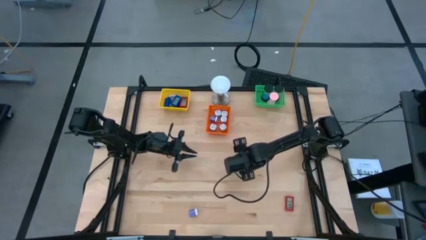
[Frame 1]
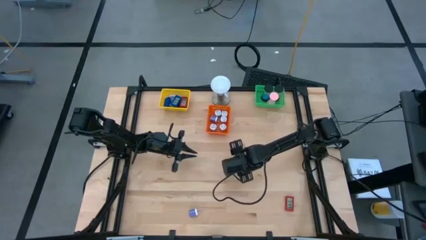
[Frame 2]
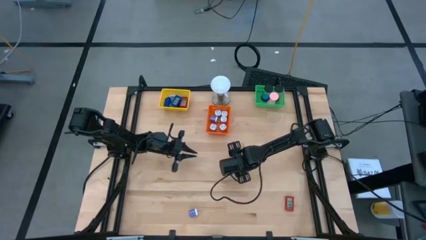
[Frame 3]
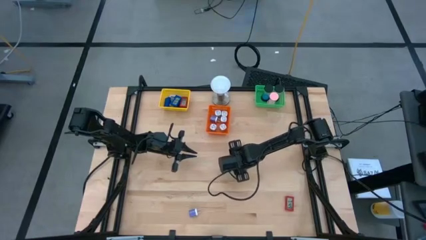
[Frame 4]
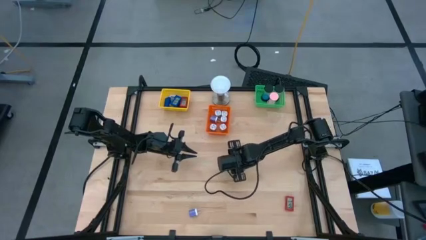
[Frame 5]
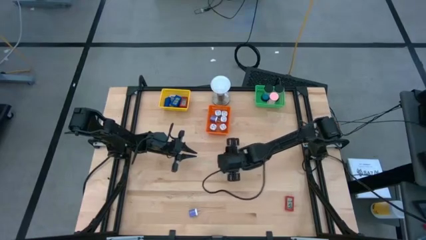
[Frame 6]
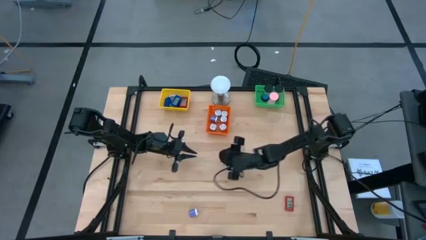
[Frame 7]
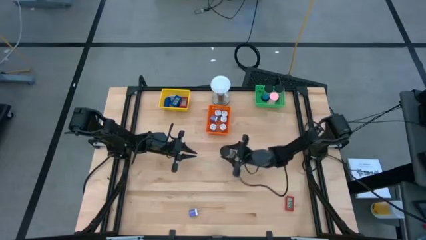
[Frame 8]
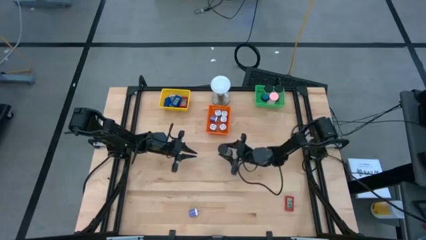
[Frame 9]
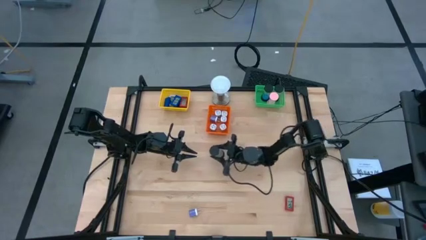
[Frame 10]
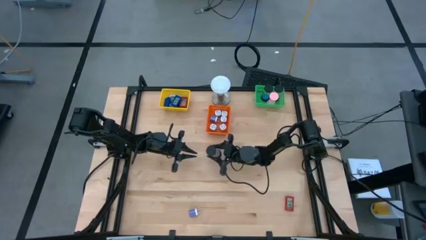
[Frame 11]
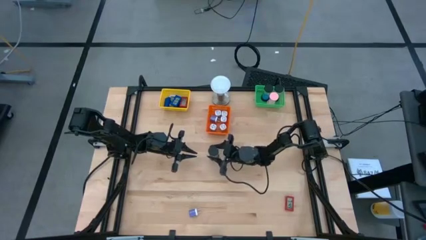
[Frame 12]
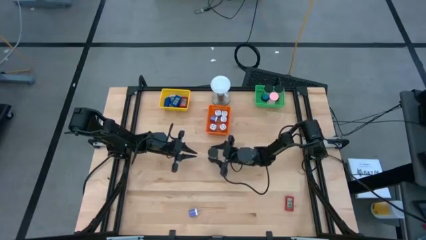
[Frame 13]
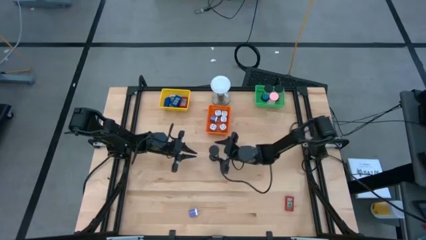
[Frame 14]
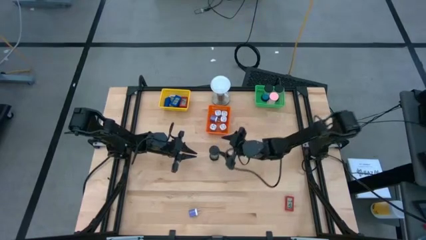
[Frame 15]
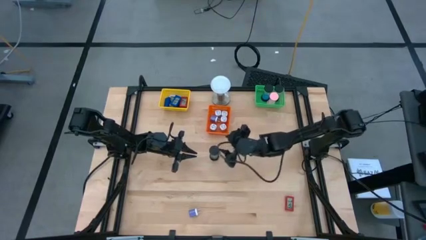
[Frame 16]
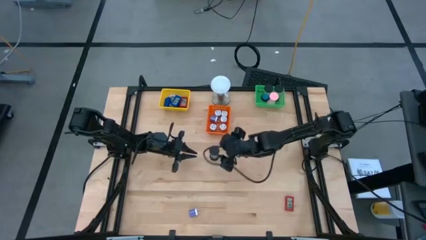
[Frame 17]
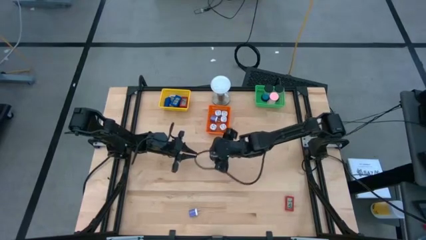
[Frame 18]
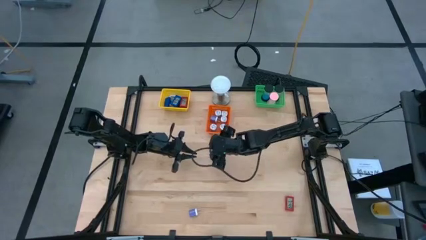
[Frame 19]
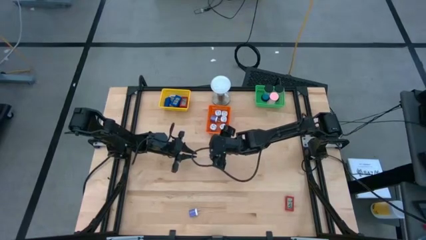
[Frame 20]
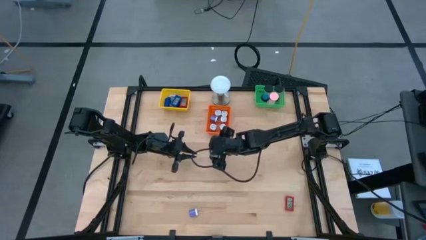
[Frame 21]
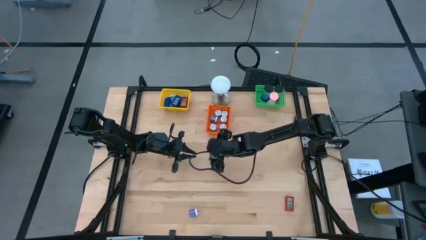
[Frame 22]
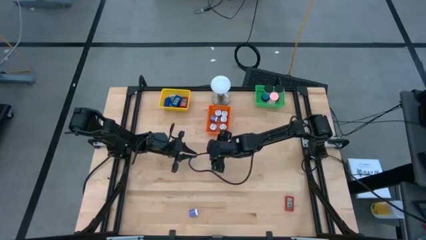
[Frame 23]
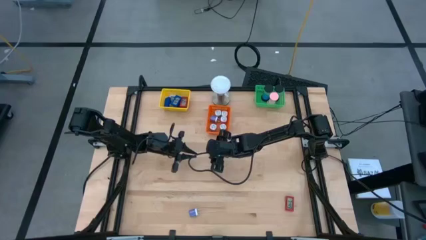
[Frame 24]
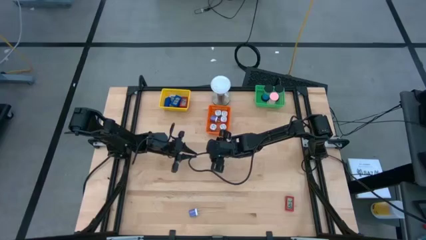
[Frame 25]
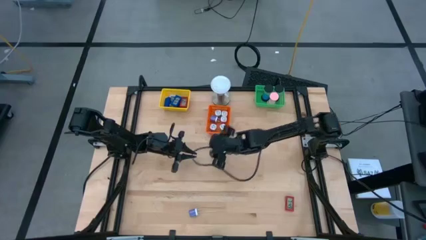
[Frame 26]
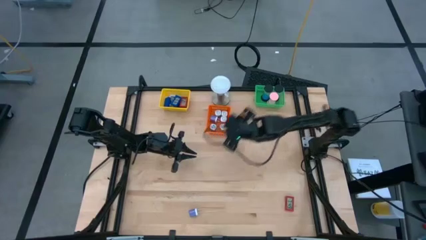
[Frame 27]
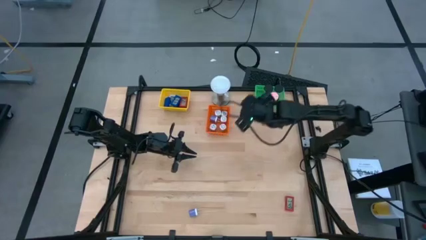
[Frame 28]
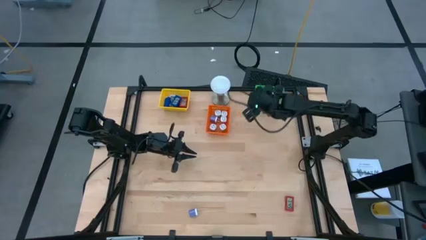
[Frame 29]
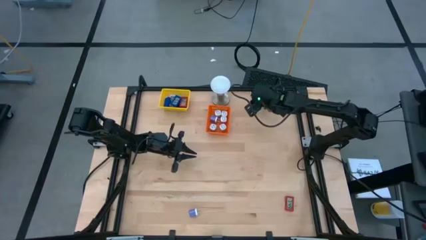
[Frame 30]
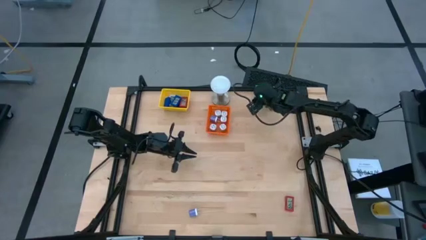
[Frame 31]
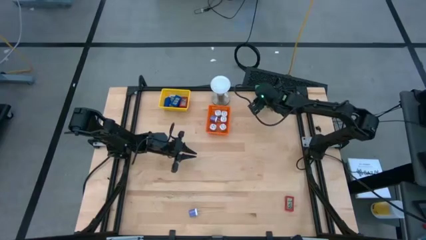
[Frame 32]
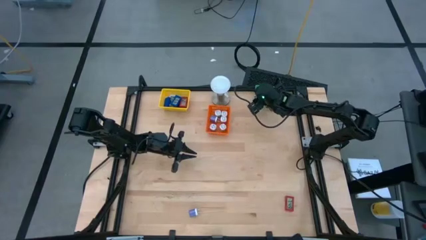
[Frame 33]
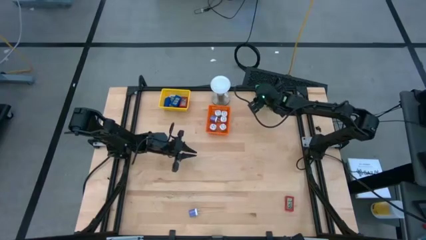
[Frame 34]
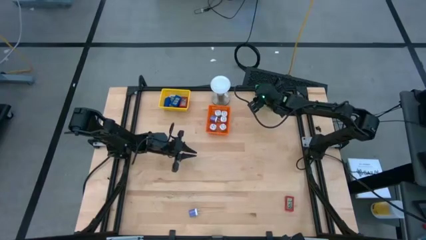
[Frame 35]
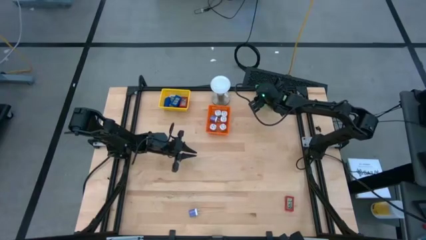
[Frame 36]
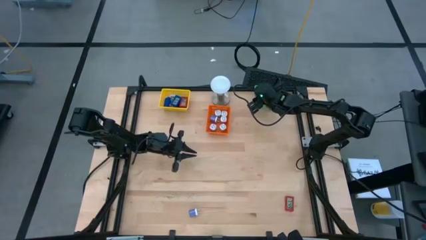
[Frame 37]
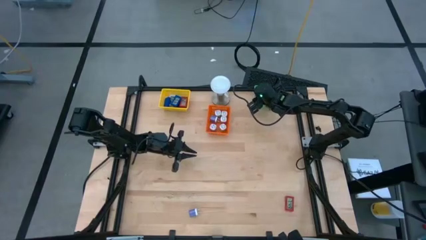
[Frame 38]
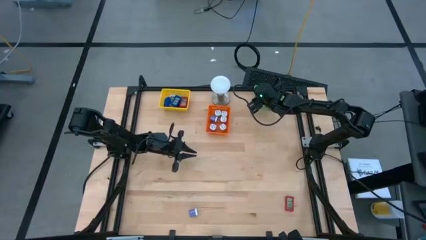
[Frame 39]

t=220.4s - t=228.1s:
Task: Pick & Place Office items
Put the orange sandglass timer into the green bin

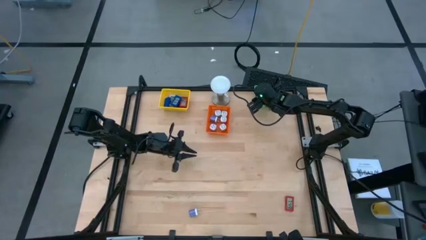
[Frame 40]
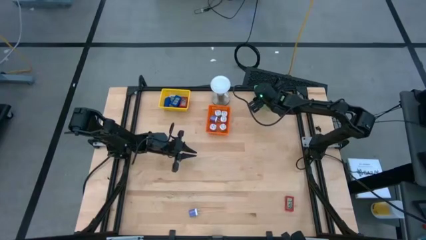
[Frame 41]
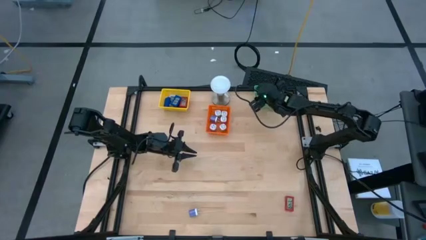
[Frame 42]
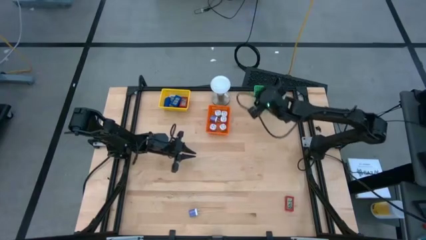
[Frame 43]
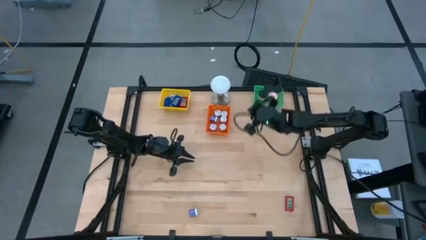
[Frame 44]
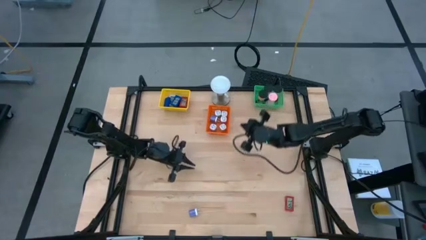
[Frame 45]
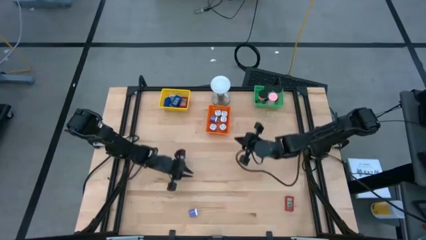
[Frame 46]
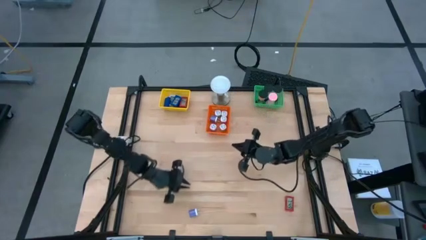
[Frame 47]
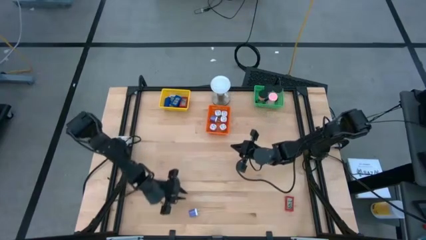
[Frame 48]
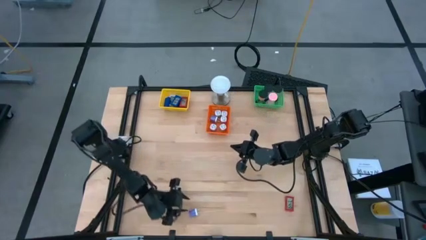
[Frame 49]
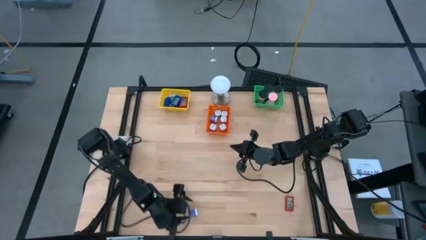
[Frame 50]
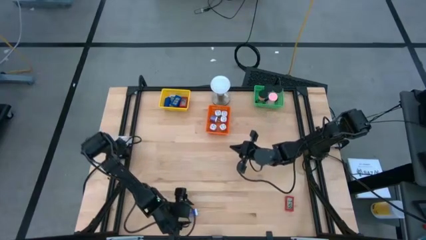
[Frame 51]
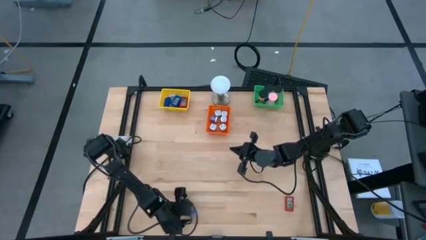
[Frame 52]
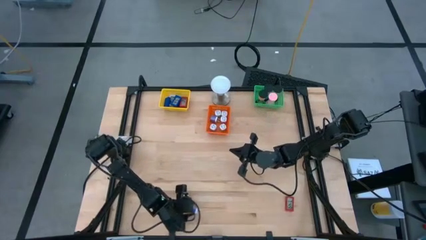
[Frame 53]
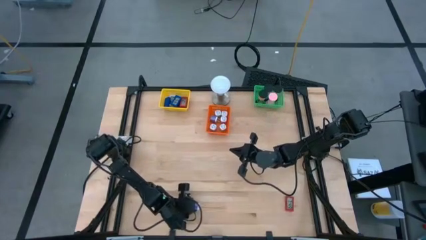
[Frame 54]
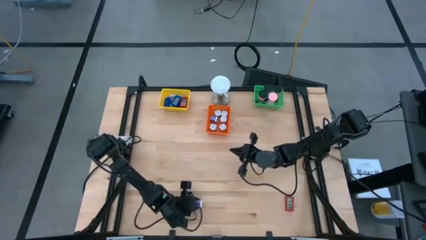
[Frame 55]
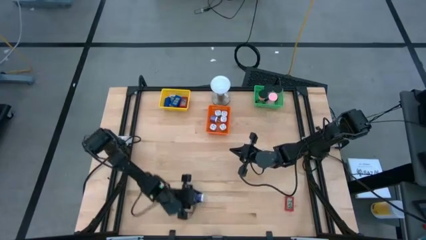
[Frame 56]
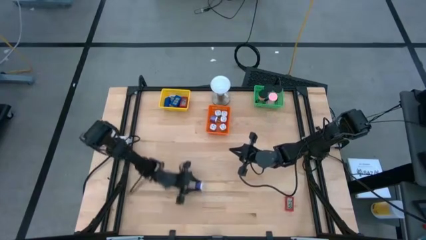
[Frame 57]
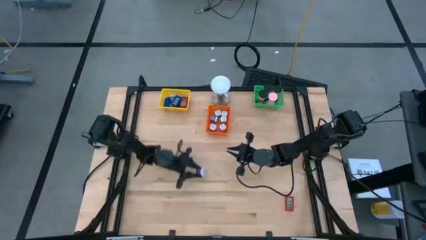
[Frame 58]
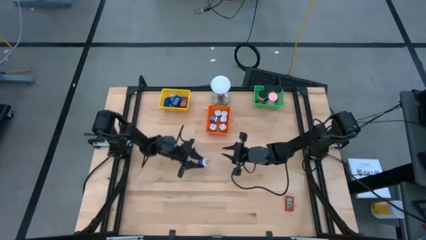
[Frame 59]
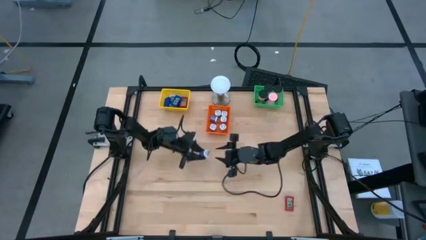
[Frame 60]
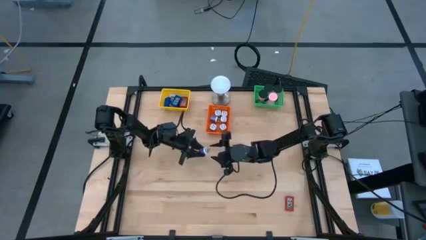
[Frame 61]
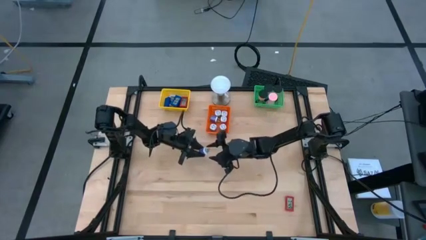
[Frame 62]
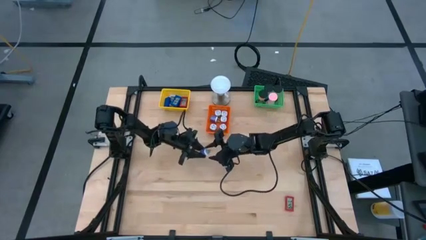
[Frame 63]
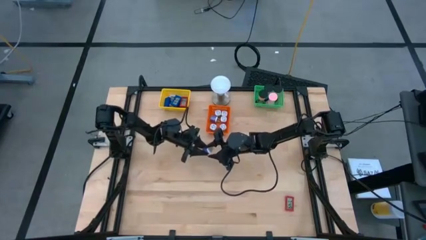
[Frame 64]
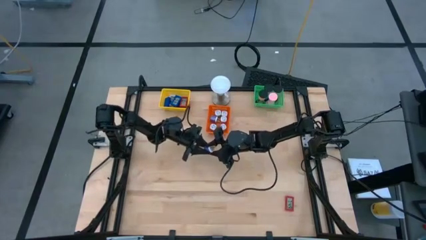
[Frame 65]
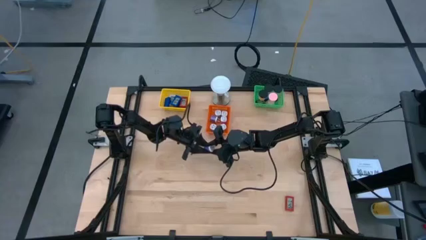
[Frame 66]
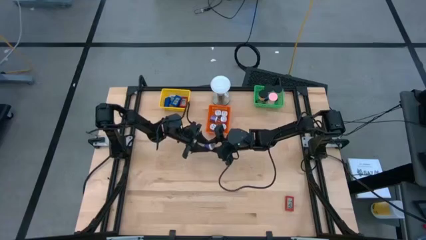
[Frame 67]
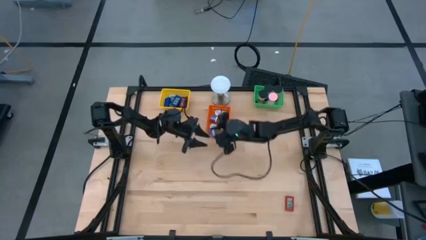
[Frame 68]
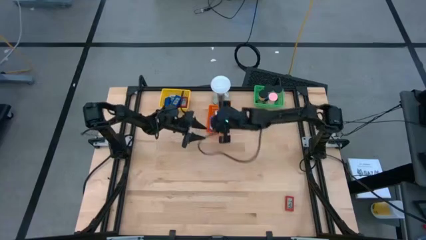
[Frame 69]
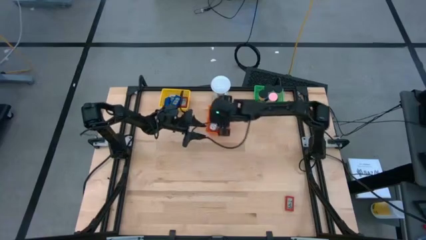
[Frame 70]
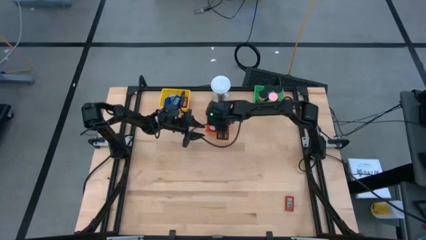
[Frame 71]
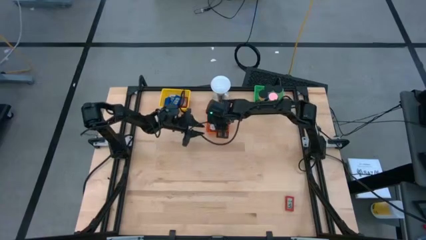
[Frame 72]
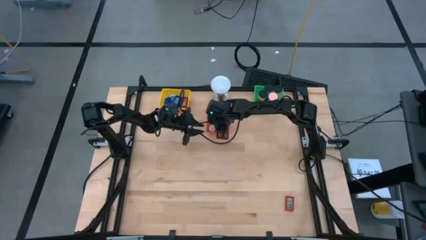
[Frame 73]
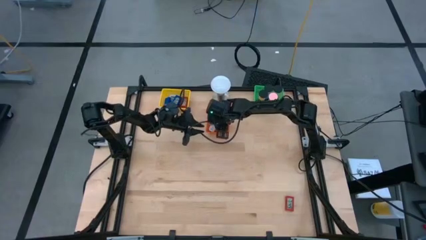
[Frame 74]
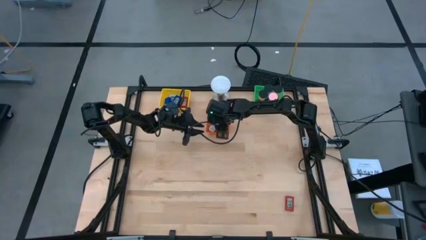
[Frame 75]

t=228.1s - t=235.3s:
Put the purple charger adapter into the orange bin
